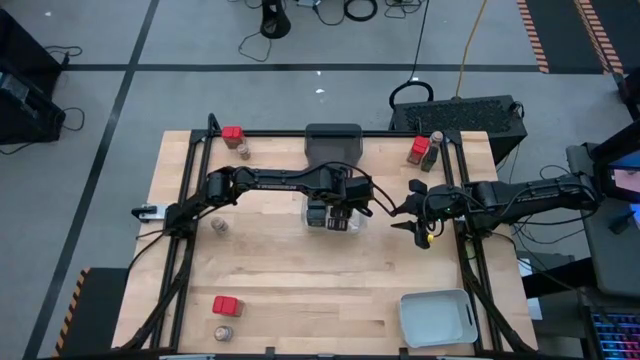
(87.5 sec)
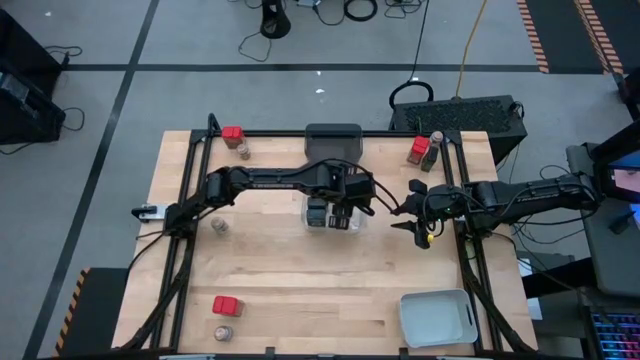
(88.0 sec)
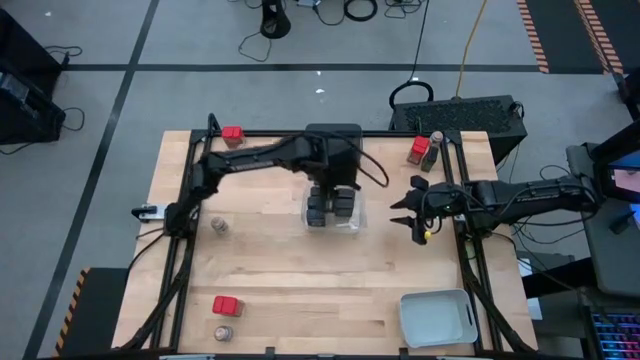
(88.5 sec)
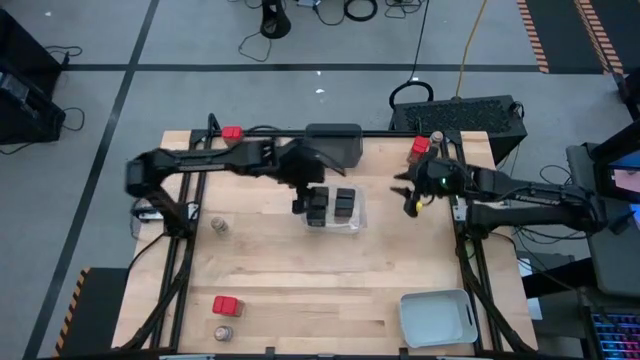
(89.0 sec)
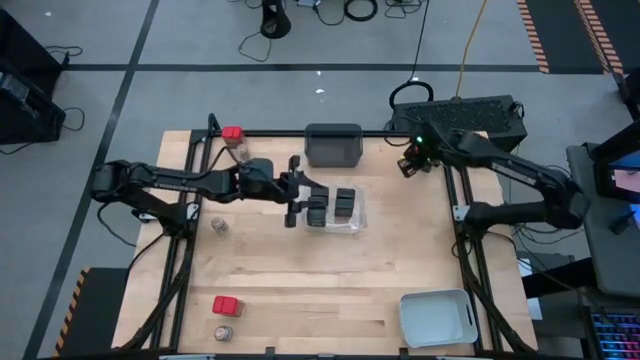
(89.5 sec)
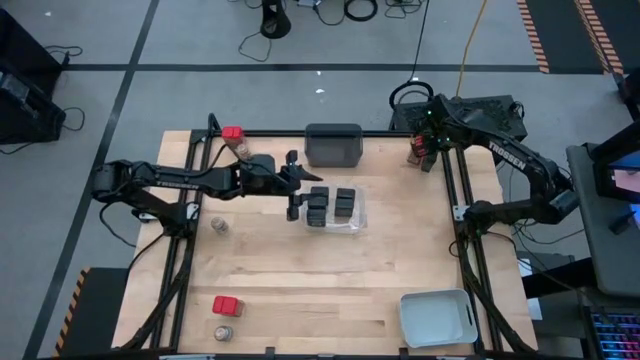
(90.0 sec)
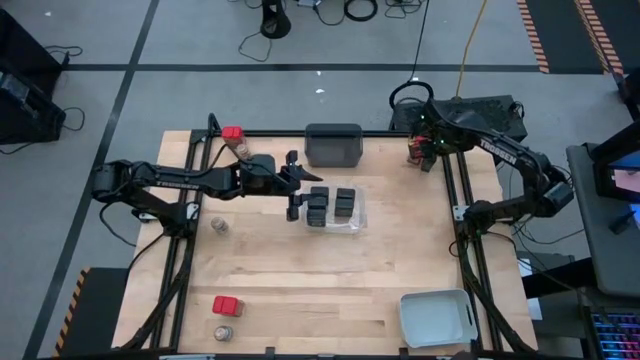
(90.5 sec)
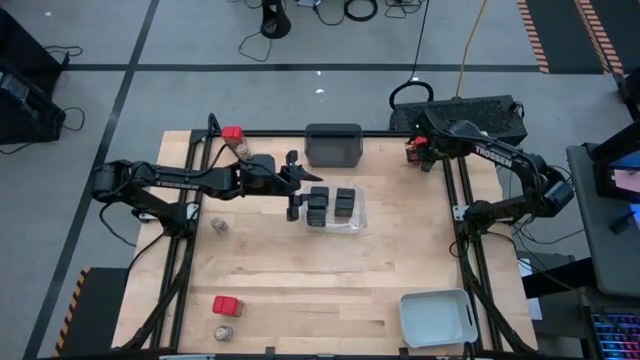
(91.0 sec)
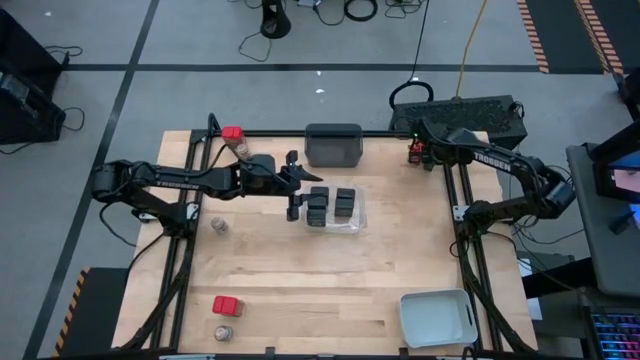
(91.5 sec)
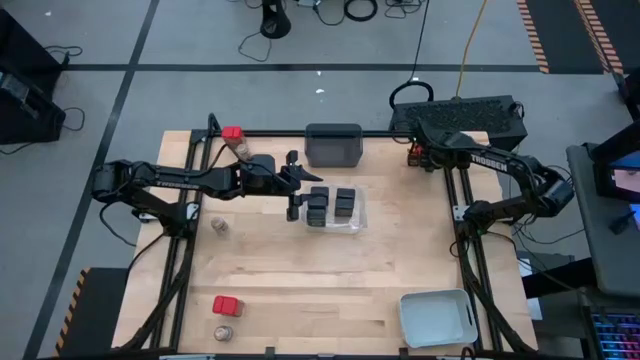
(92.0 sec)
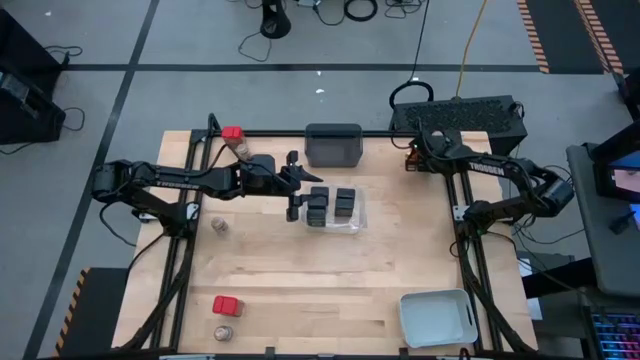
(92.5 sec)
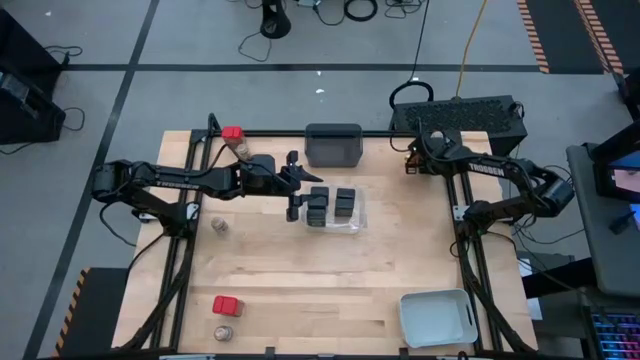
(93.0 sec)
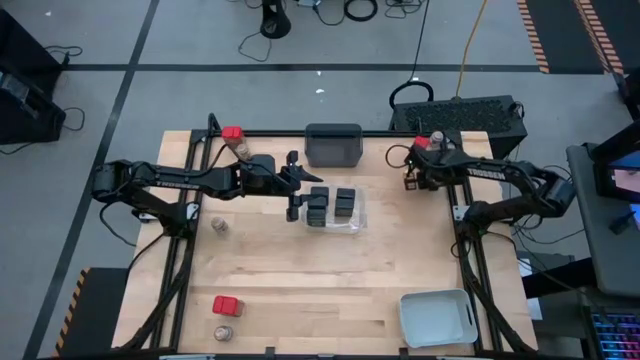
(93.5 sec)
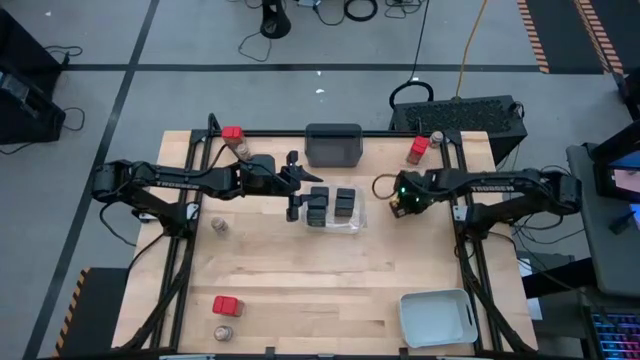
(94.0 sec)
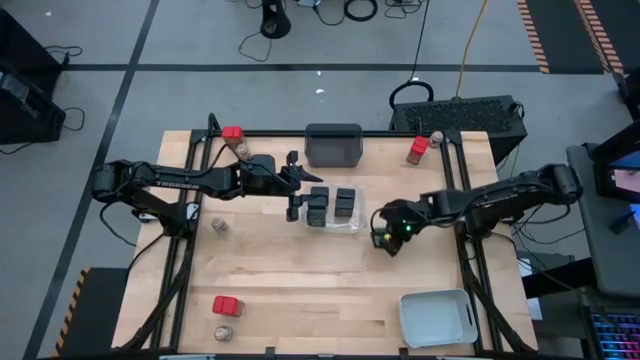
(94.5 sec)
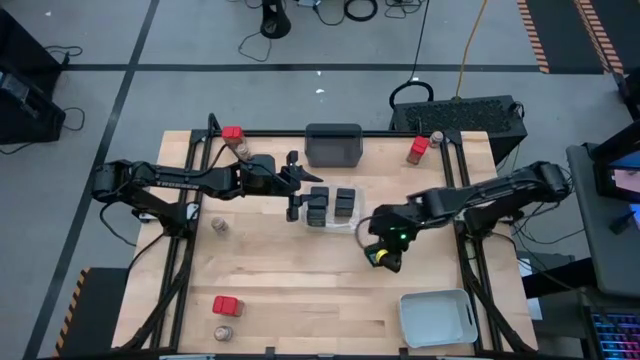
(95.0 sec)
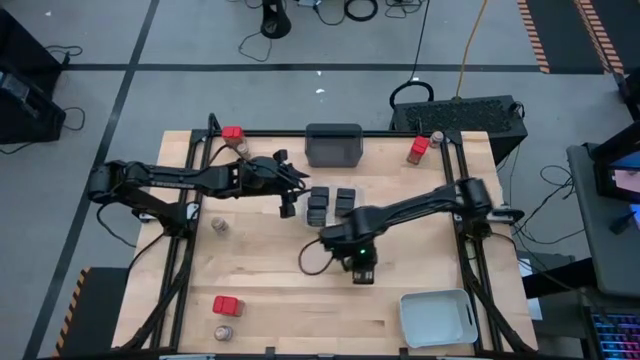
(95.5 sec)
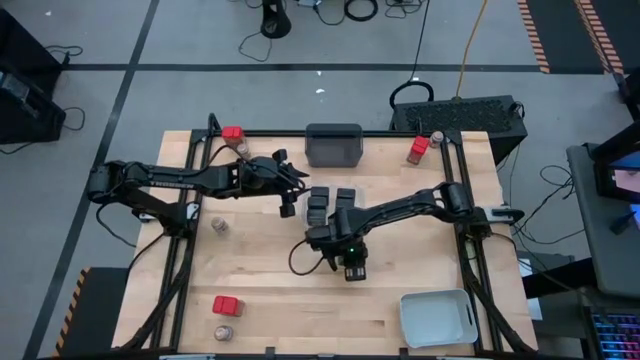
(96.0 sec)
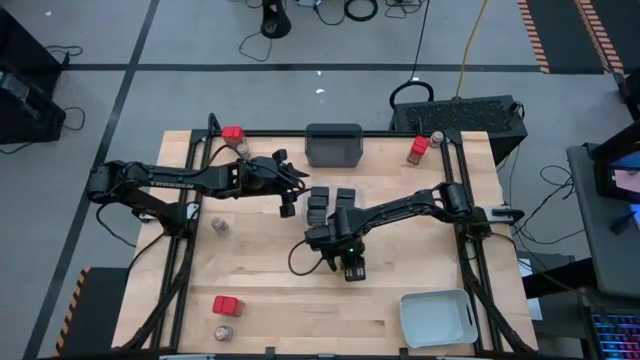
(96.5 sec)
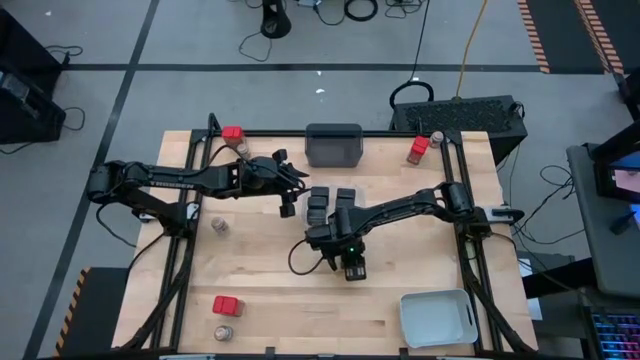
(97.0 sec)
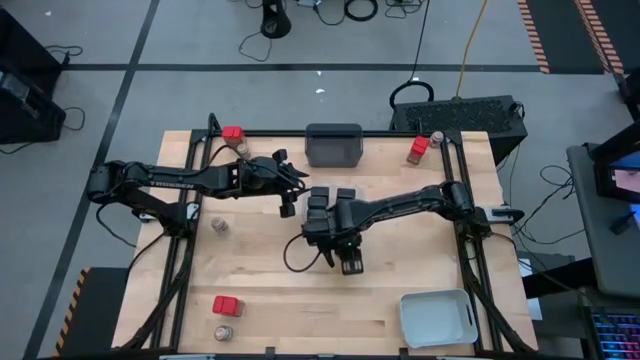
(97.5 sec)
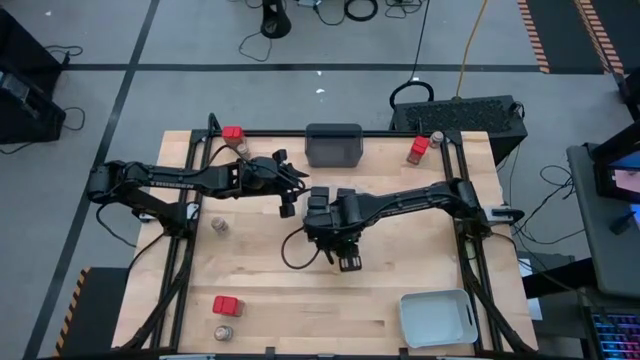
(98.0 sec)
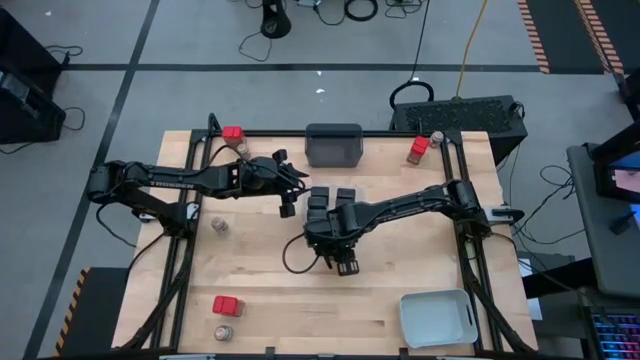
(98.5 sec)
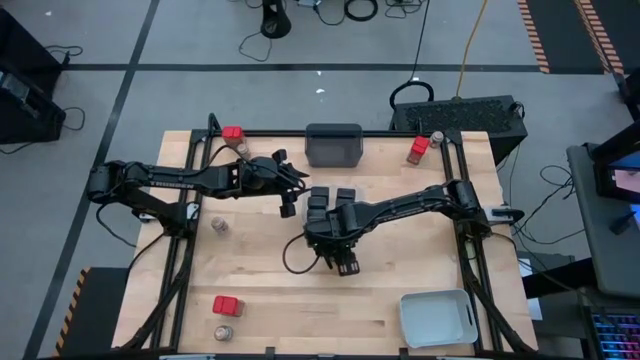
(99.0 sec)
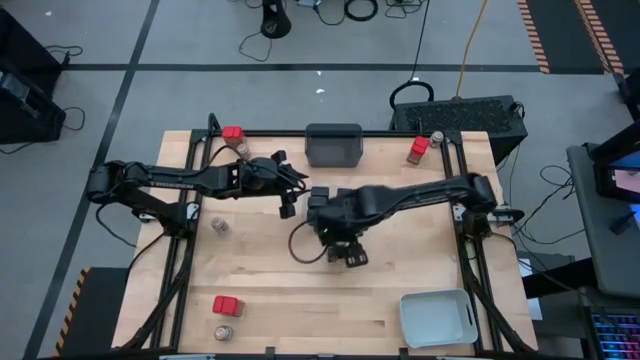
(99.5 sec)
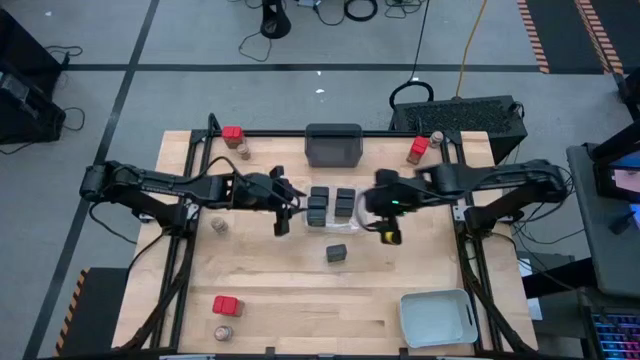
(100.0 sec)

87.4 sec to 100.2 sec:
Task: Sort spices by type
Put the green seasoning into the transparent bin

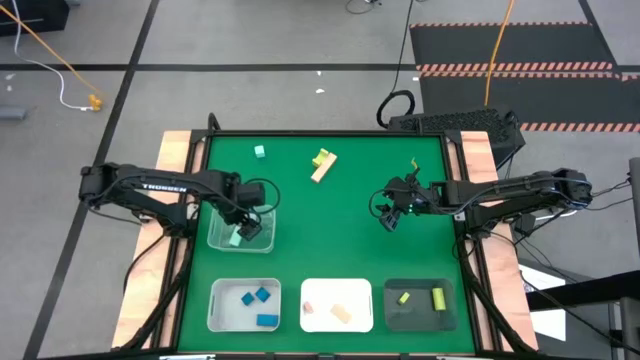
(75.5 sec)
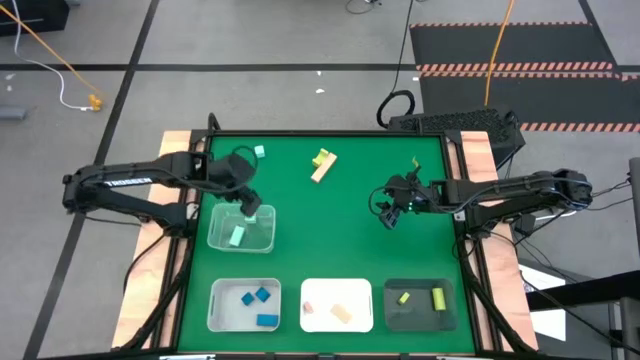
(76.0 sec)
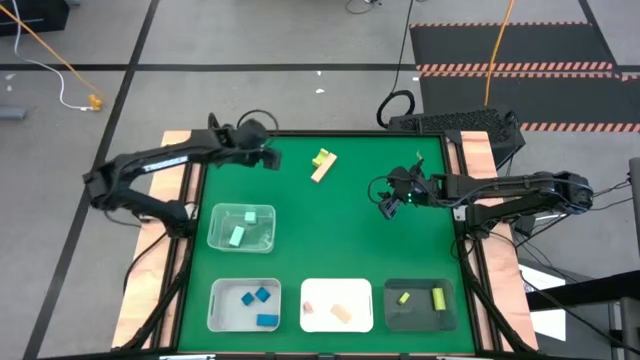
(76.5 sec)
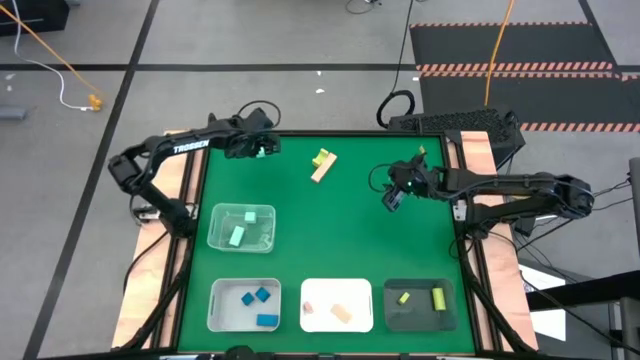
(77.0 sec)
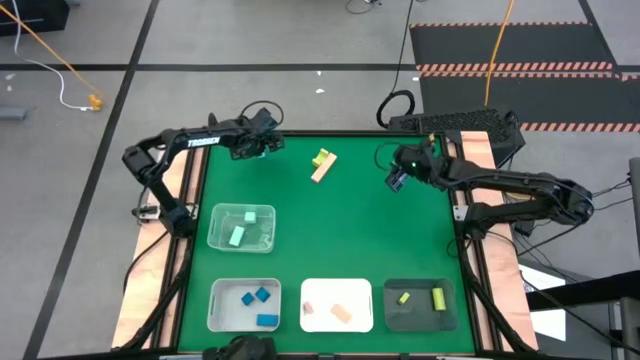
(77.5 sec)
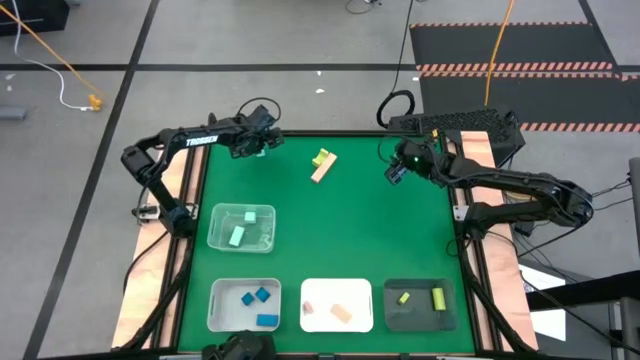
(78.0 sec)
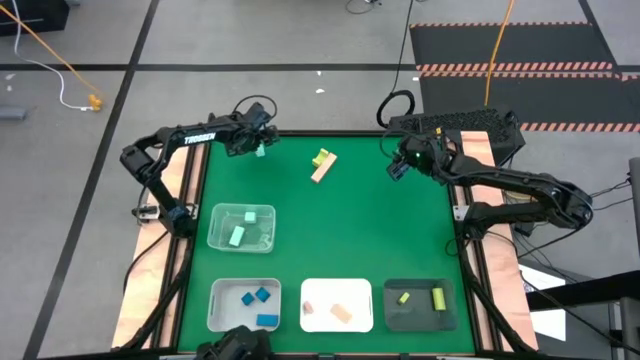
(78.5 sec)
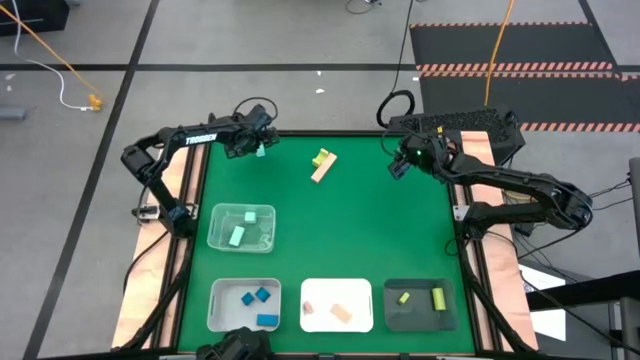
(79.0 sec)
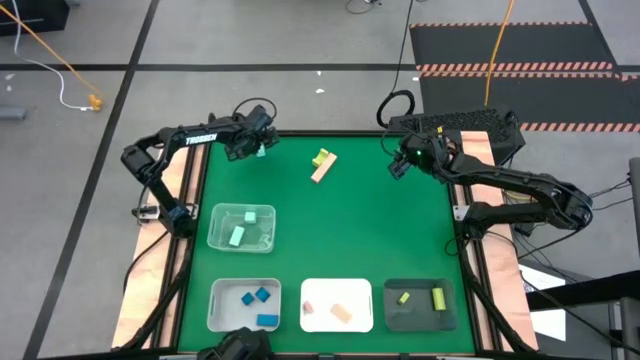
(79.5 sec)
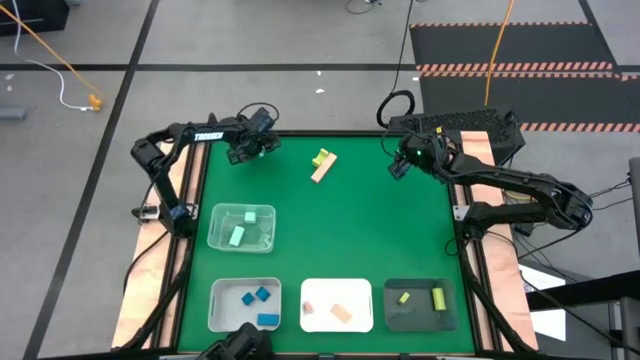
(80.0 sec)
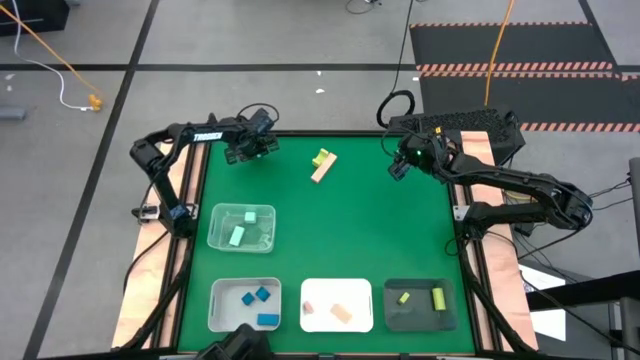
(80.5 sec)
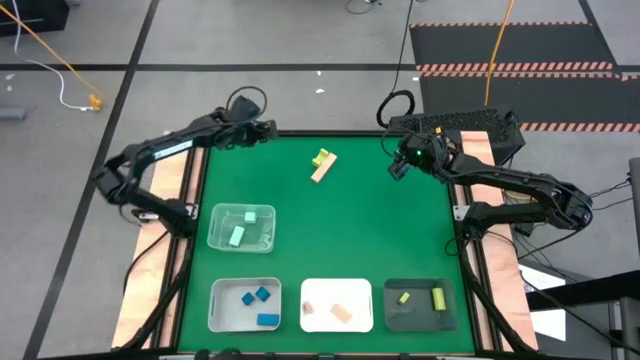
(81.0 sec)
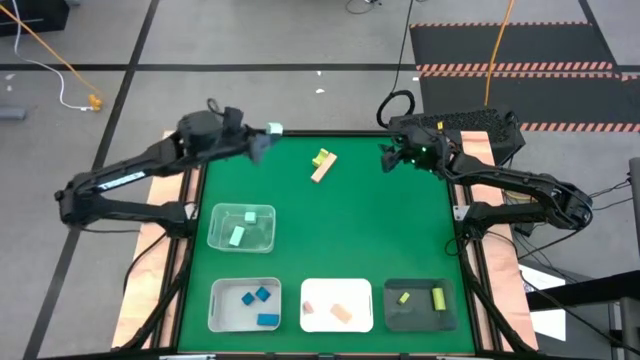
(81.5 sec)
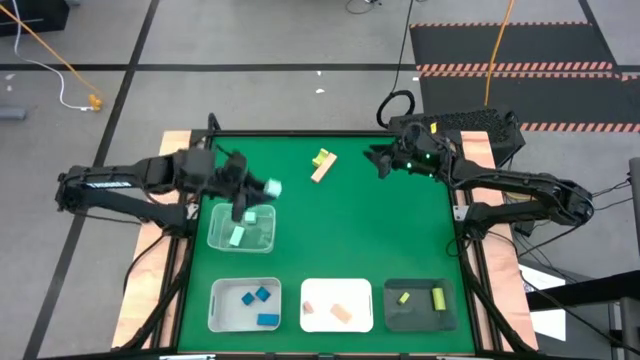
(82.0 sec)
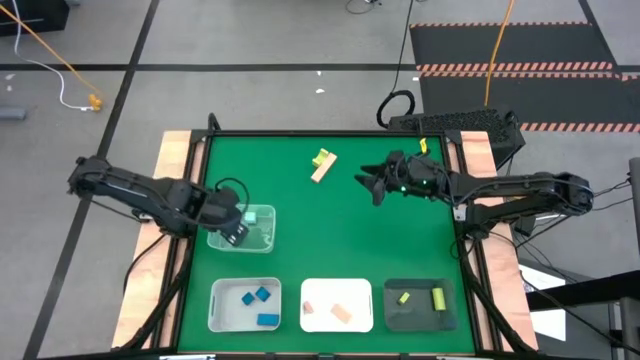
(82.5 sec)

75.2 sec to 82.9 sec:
Task: Sort & place blocks by color
Put the light blue block into the transparent bin
